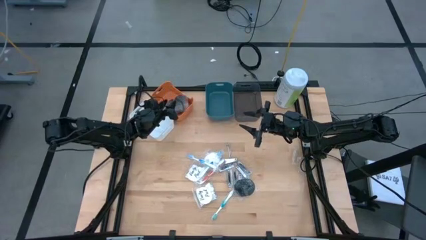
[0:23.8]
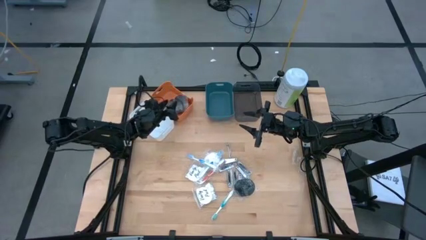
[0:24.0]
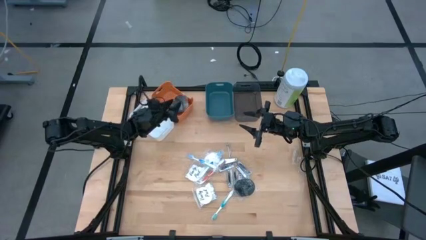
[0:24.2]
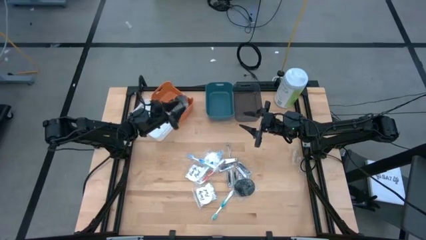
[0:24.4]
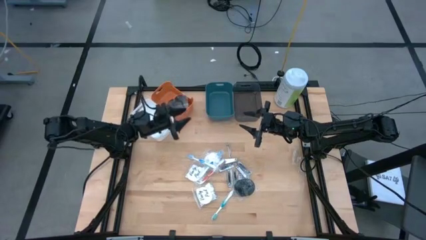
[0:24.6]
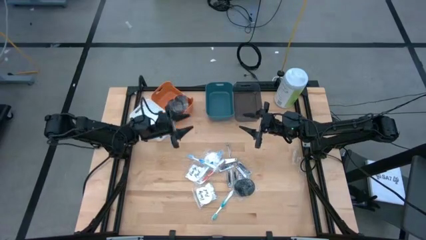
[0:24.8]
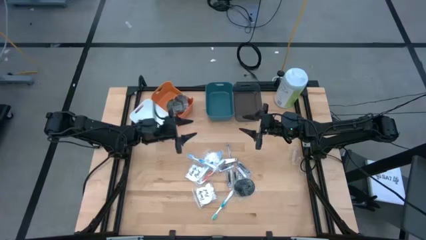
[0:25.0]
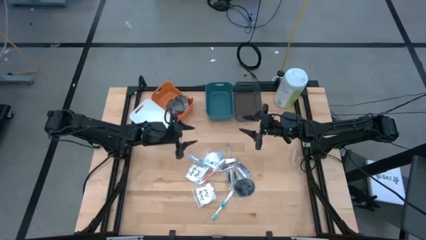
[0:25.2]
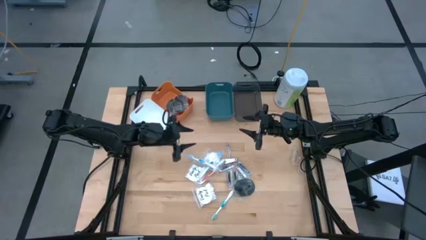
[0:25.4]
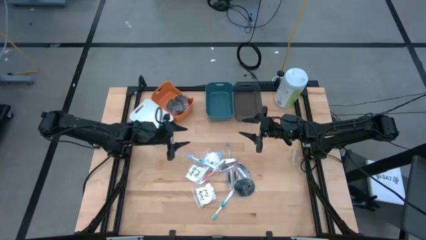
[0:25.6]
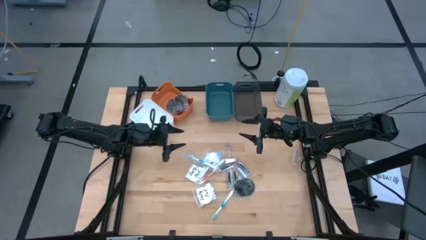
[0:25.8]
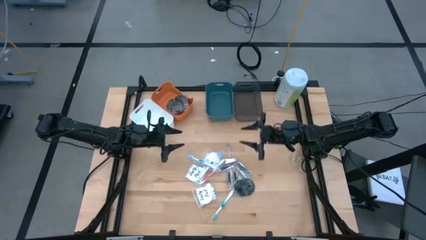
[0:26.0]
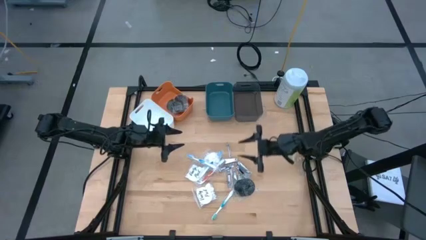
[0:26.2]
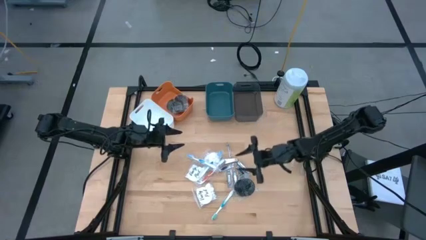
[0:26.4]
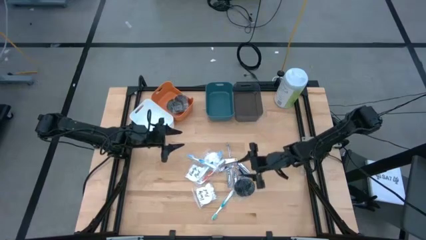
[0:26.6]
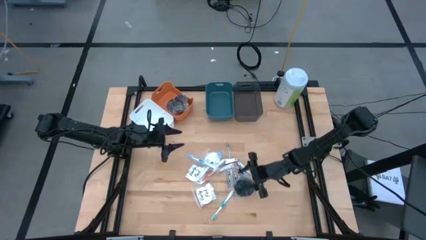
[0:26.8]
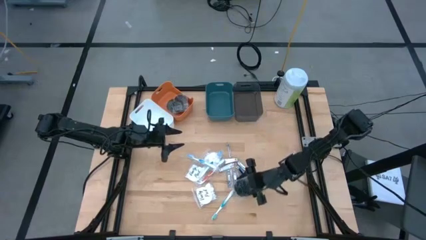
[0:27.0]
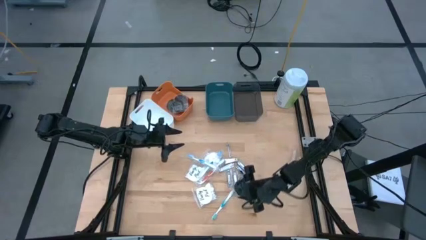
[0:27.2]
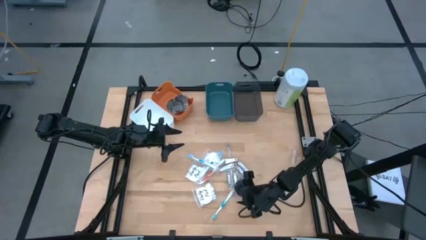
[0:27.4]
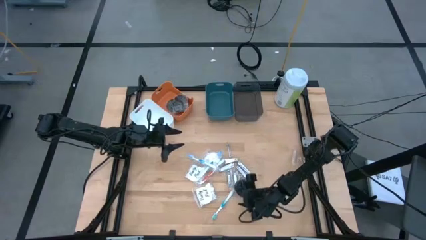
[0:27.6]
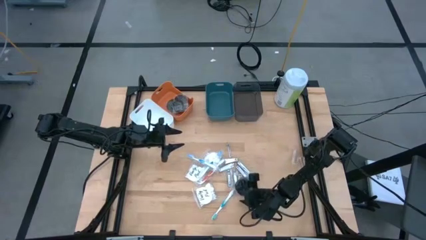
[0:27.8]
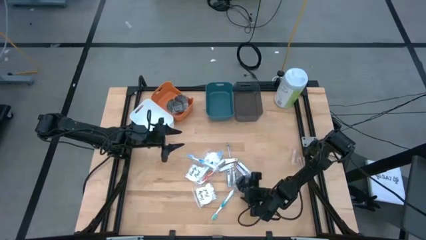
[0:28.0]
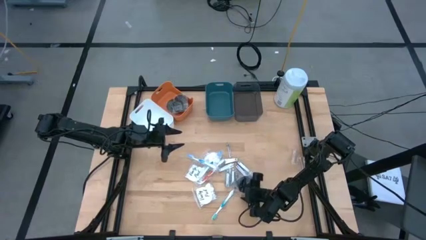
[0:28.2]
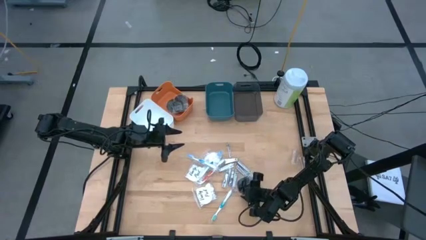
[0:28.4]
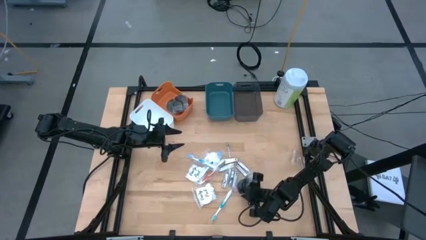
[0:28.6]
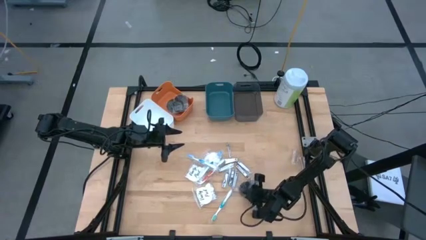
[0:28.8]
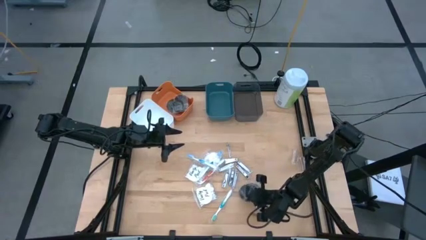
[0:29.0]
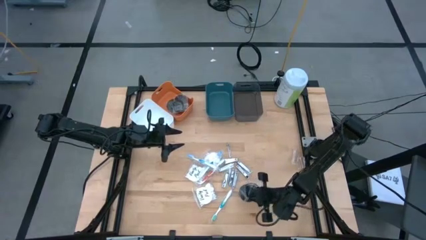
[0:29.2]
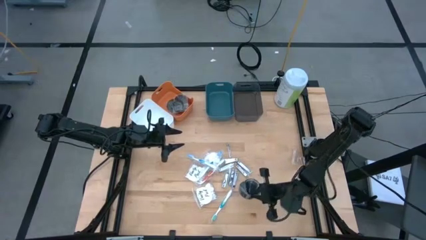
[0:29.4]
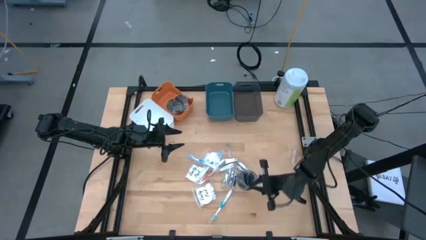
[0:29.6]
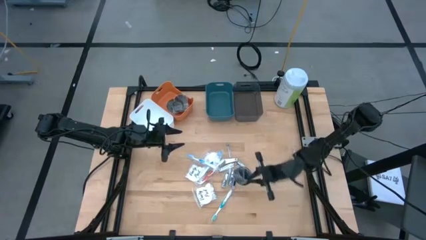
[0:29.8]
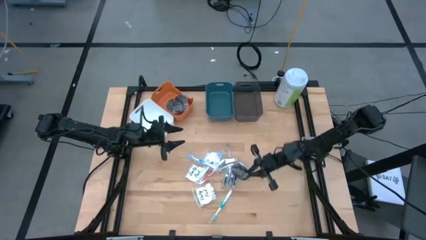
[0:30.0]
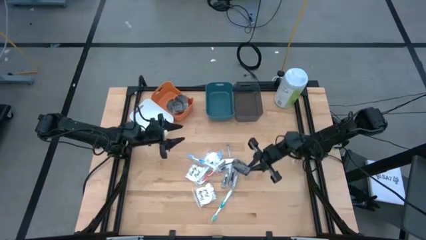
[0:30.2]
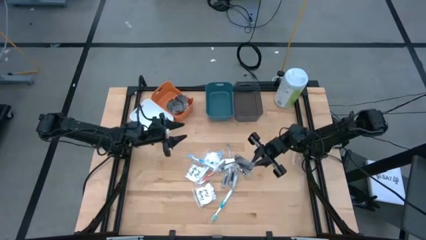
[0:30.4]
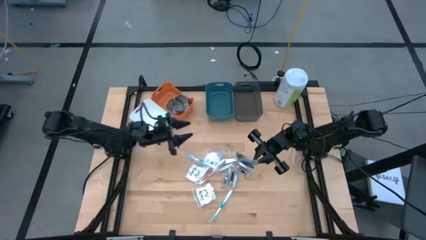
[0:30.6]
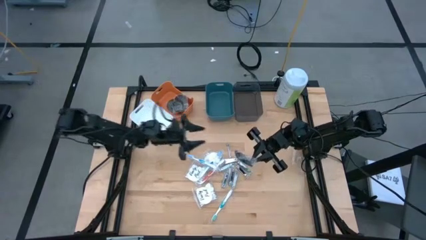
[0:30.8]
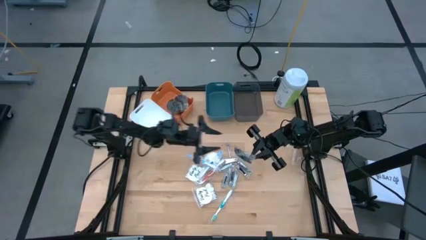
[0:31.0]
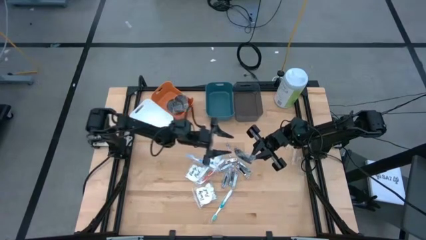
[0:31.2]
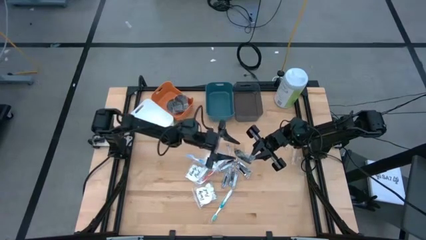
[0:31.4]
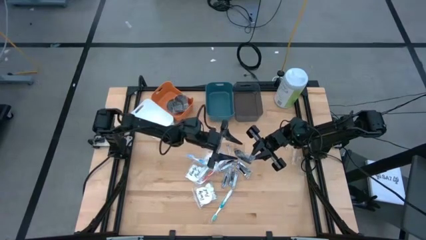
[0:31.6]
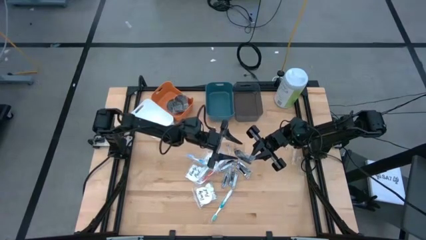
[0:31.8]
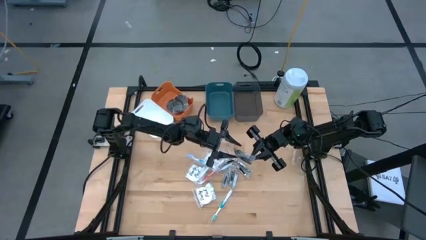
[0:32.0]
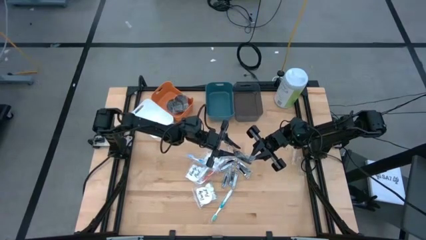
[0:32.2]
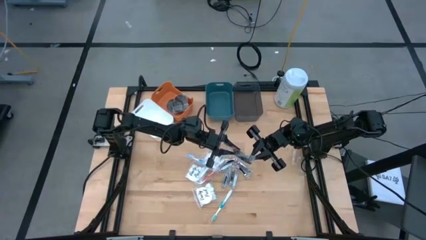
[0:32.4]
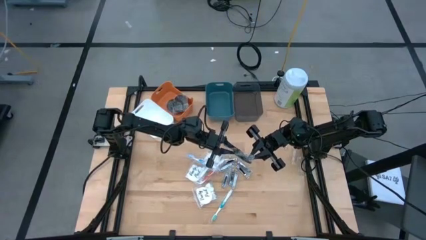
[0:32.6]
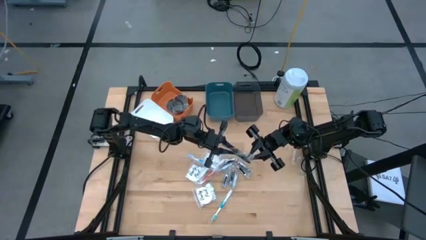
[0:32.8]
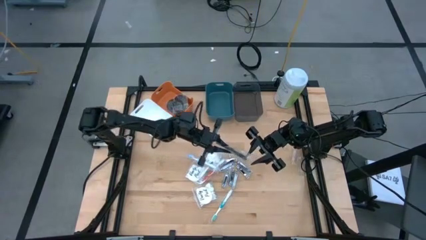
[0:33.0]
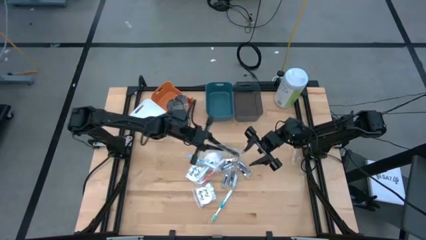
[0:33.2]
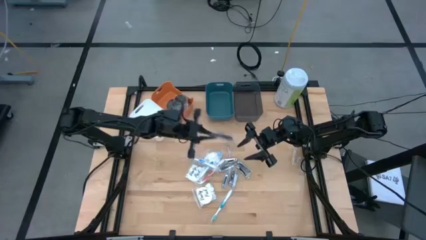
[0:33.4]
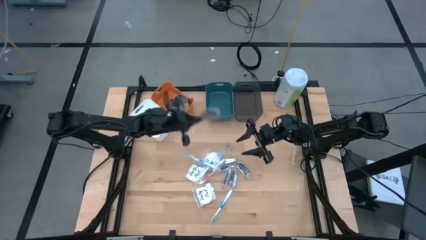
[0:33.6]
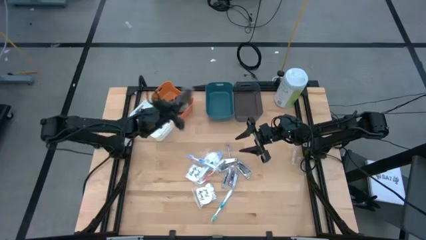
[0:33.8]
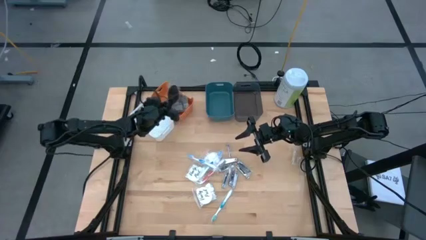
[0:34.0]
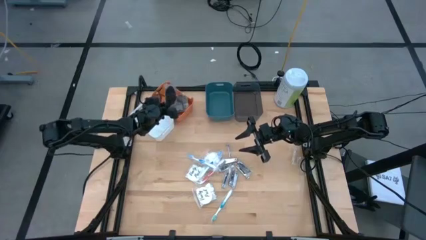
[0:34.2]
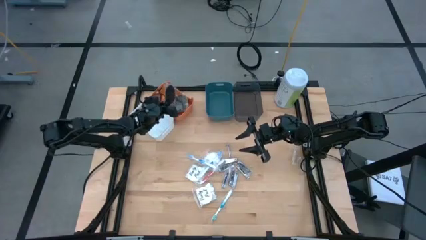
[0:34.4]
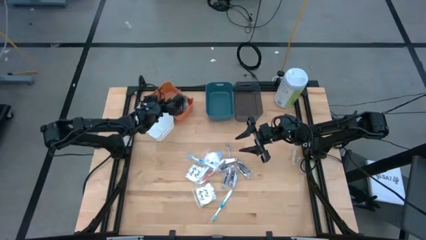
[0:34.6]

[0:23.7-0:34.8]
Task: Pick & Place Travel size toiletries
Put the black hairbrush into the orange bin

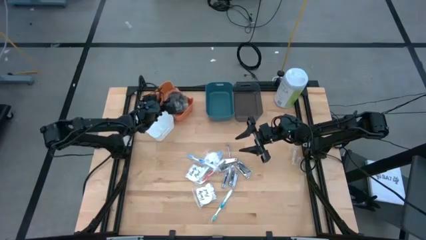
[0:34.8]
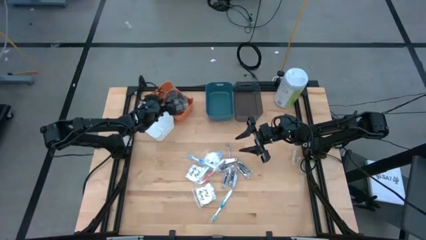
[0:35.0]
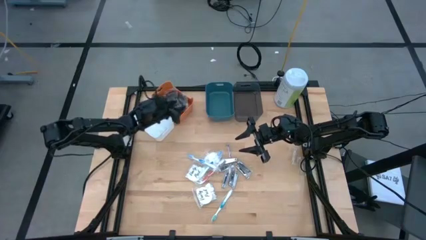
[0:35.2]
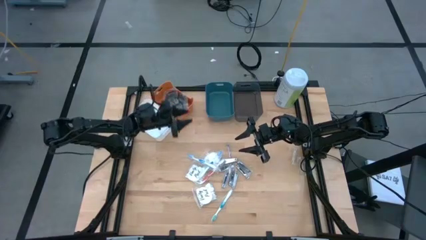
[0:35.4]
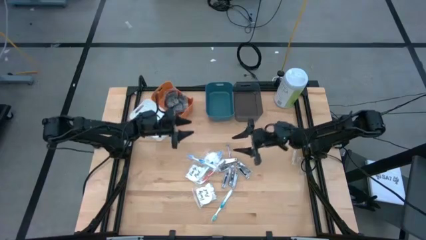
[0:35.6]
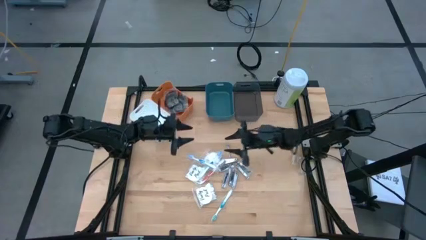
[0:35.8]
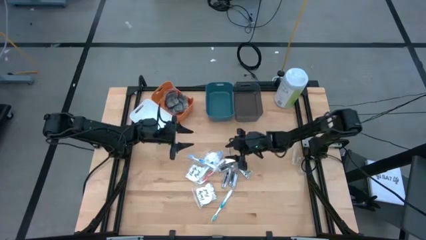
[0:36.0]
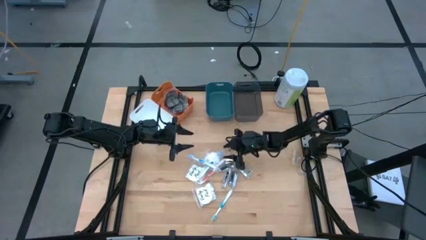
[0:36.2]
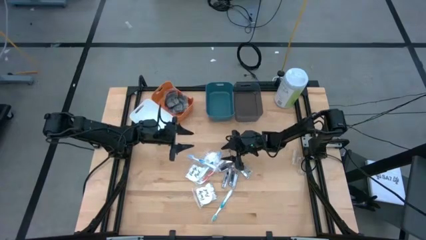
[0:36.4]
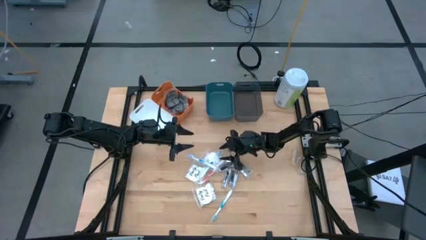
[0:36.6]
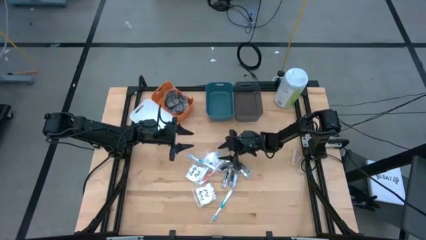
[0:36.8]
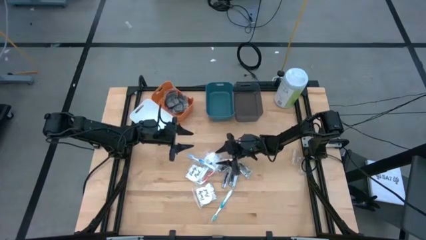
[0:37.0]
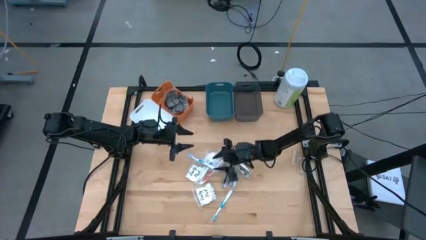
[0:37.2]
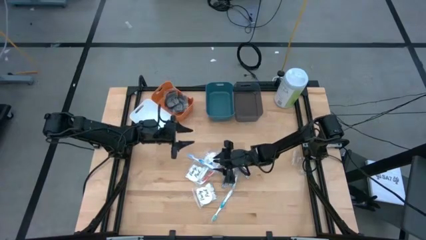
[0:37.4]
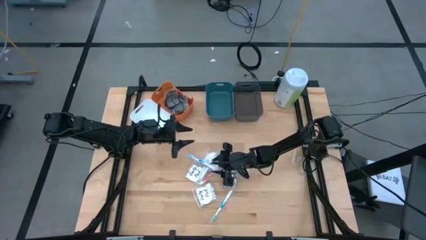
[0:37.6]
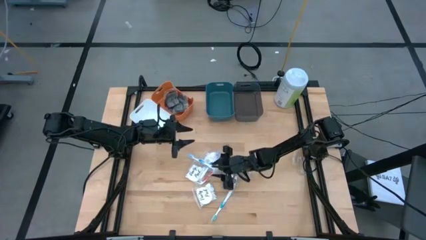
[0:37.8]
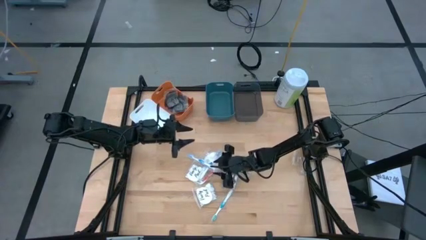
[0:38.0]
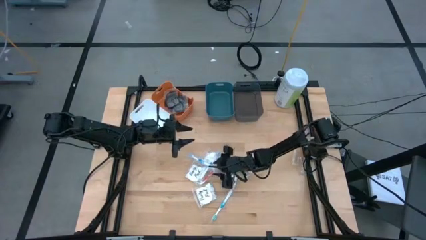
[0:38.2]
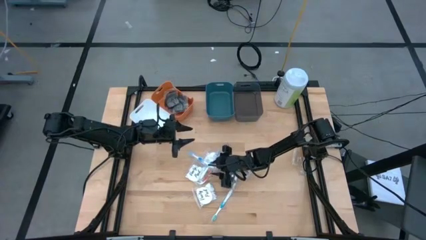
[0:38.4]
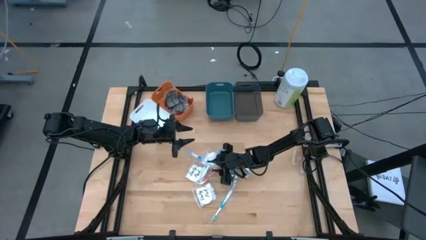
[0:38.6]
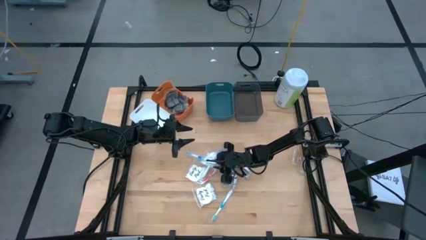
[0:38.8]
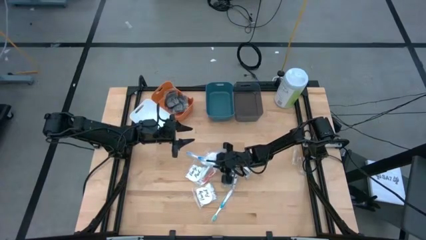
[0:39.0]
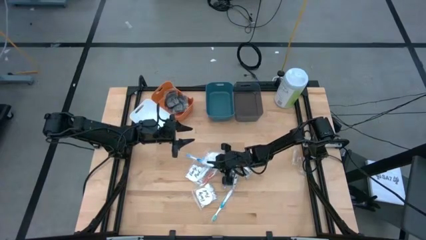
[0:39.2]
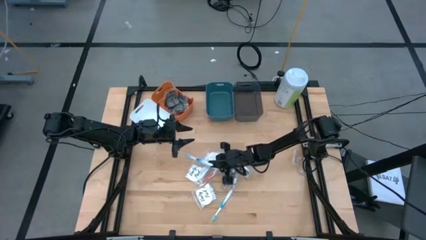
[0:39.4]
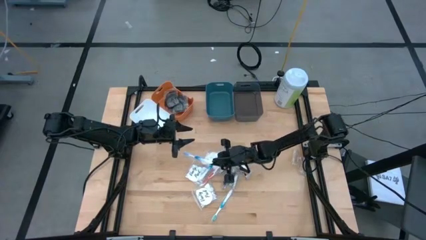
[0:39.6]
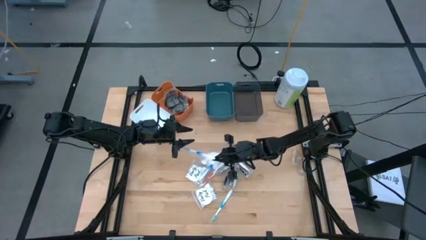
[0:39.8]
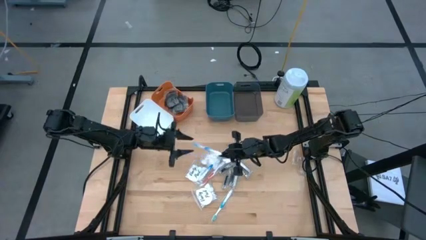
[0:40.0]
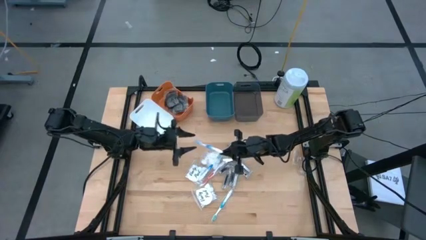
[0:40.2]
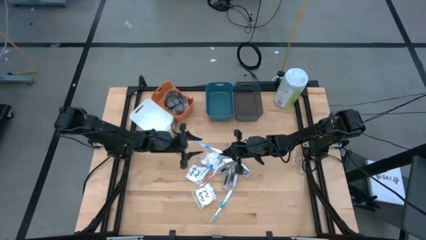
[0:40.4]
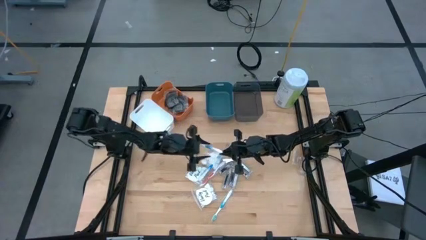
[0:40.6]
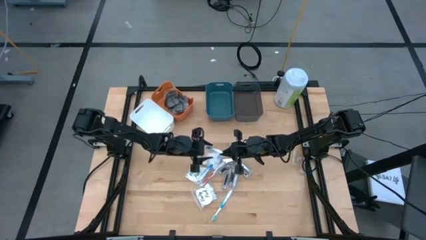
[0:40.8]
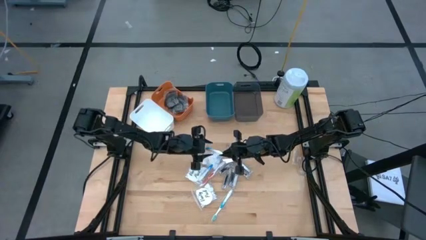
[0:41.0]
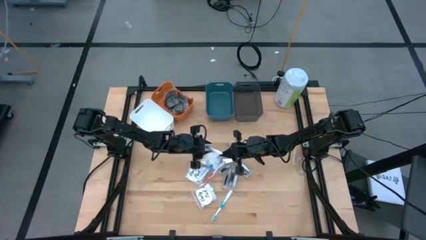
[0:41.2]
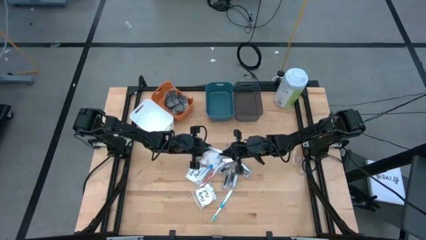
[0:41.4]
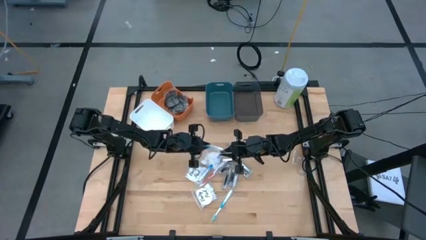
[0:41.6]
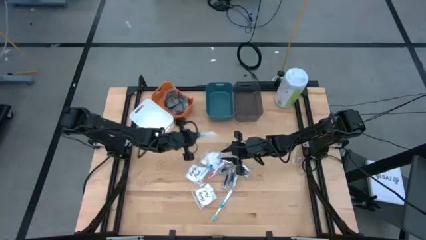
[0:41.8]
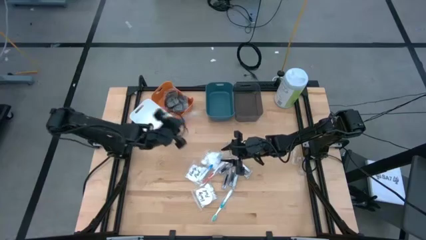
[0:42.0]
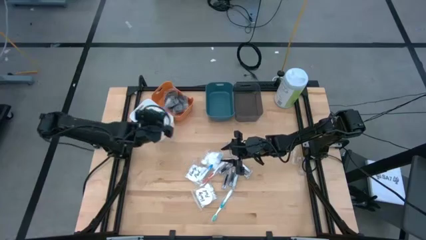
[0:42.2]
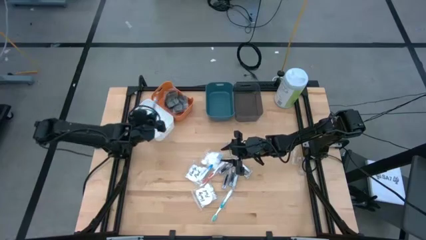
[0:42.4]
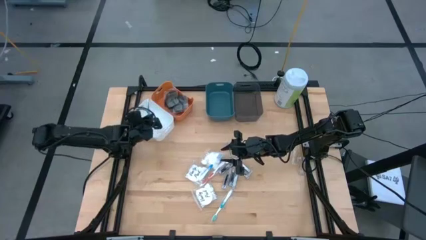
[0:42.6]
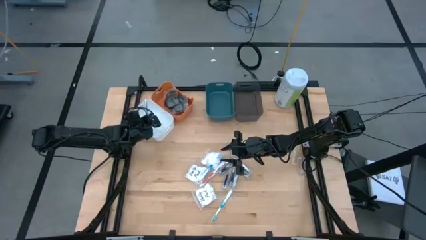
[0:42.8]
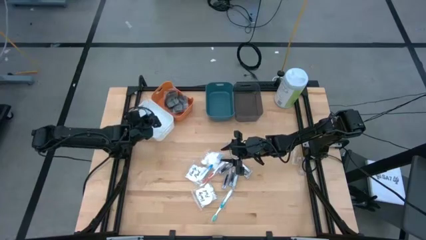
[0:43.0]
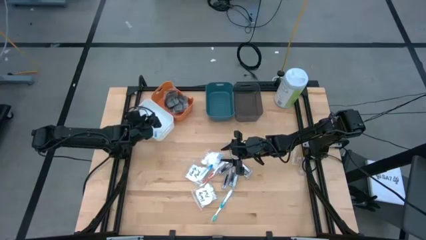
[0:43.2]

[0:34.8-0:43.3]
Put the left blue toothbrush into the white bin
